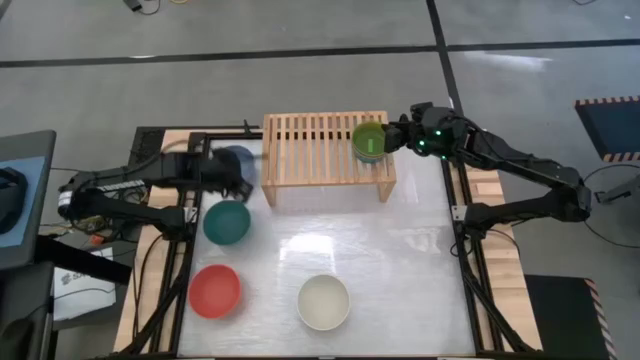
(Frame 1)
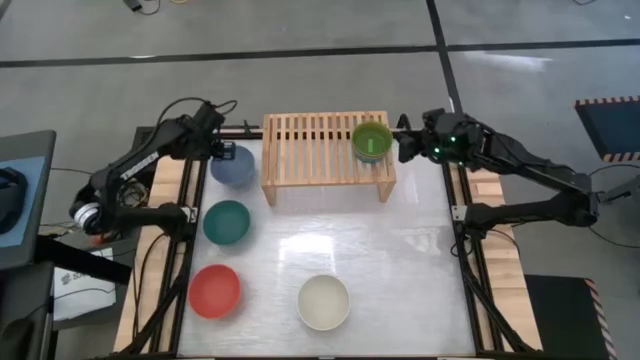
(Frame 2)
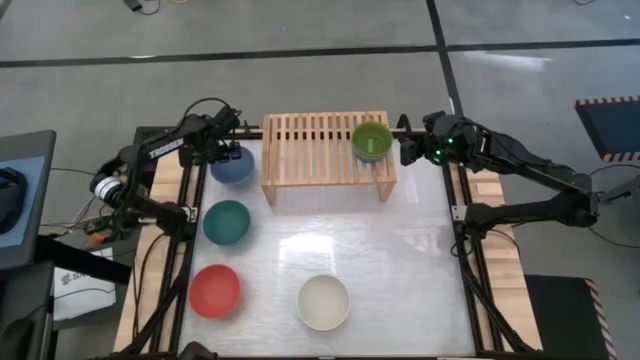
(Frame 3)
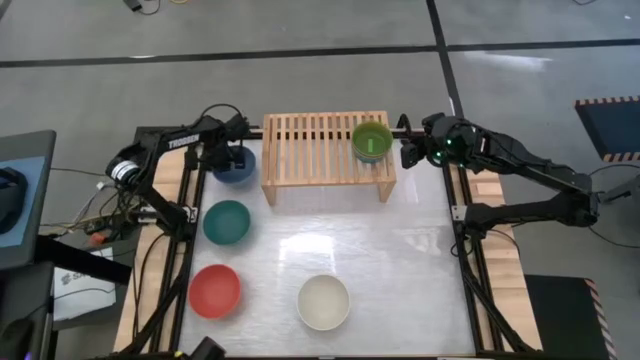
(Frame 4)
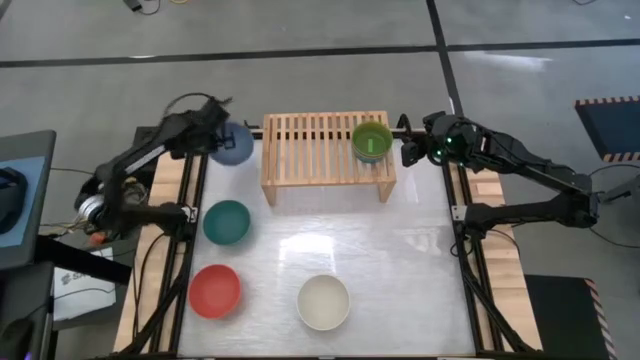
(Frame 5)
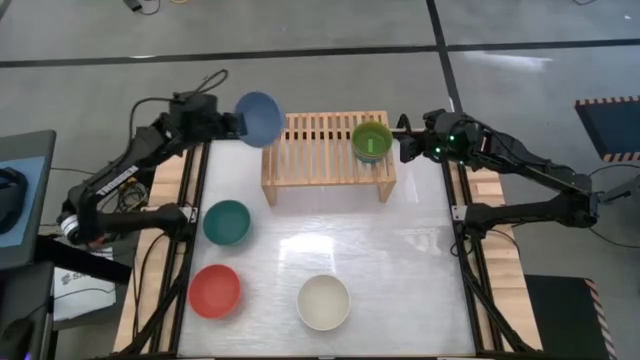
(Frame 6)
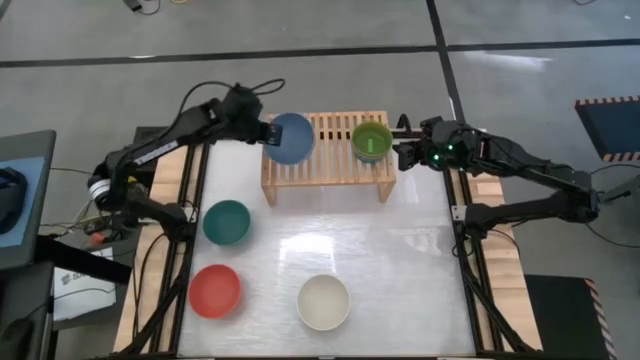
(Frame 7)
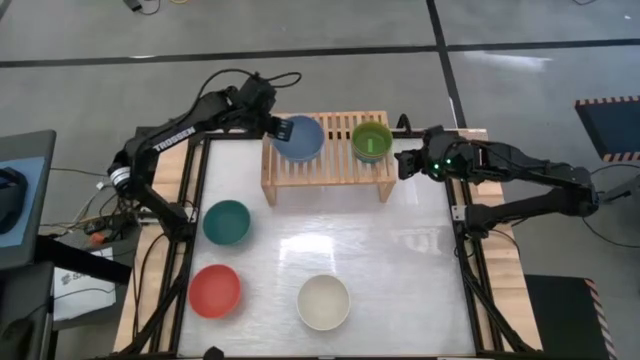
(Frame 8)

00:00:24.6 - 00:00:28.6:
Task: Place and stack bowls onto a shelf
Put the large blue bowl on the shelf

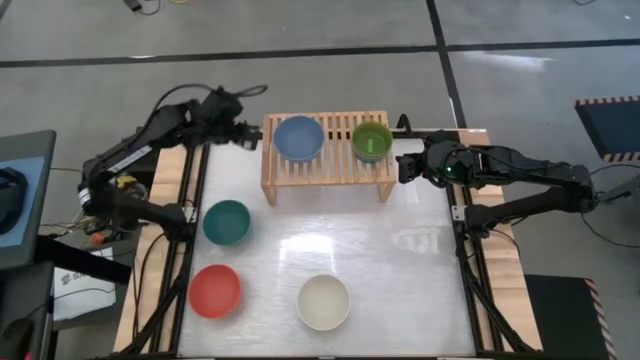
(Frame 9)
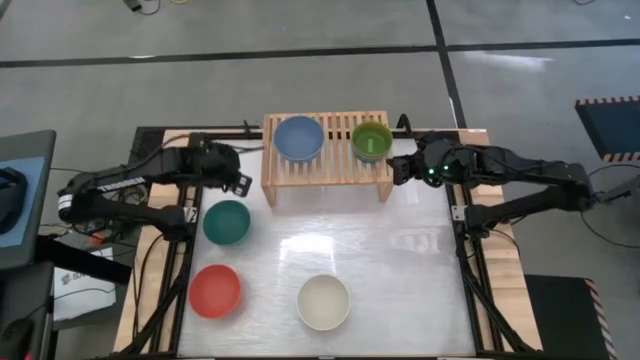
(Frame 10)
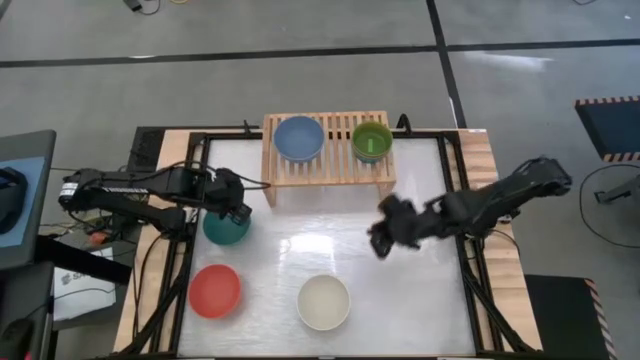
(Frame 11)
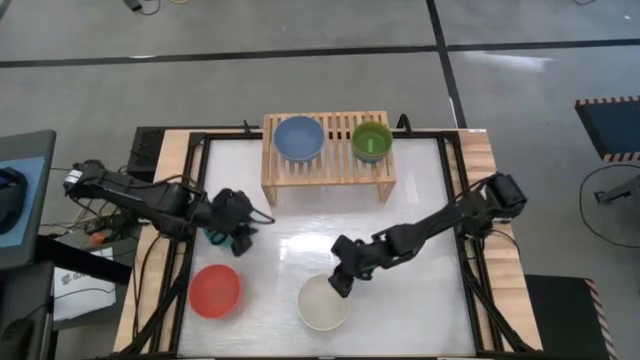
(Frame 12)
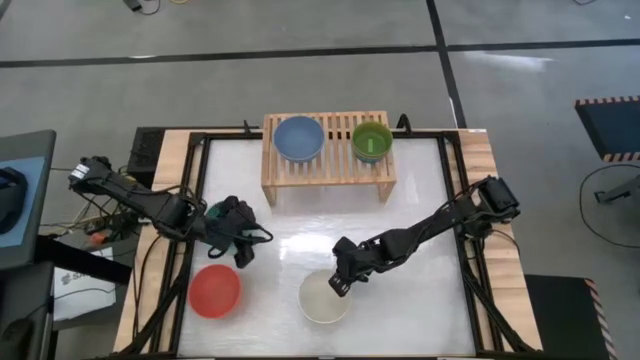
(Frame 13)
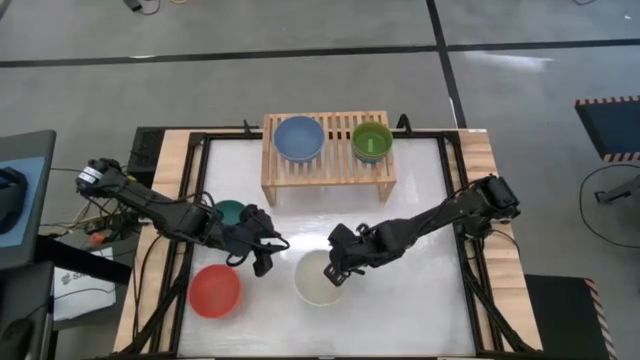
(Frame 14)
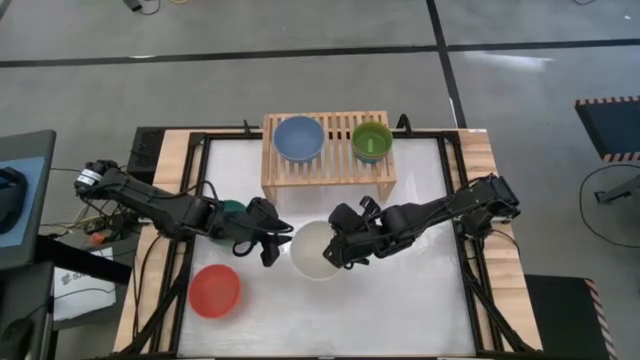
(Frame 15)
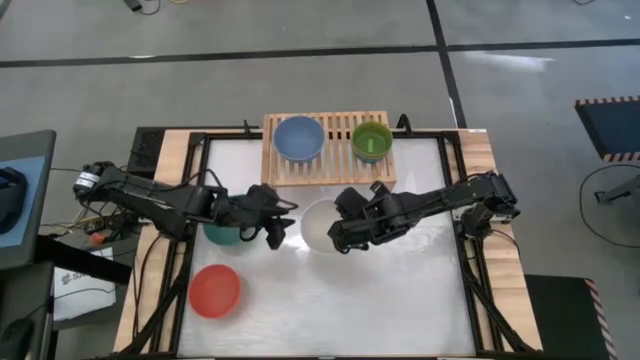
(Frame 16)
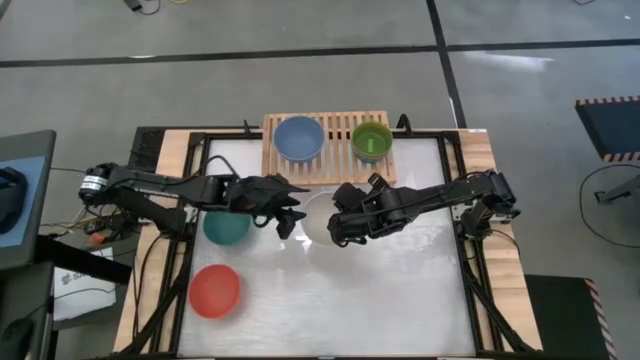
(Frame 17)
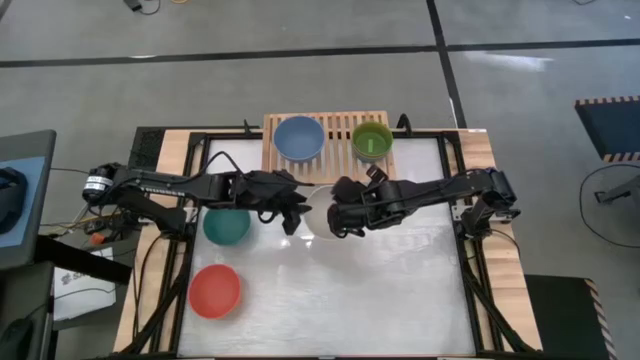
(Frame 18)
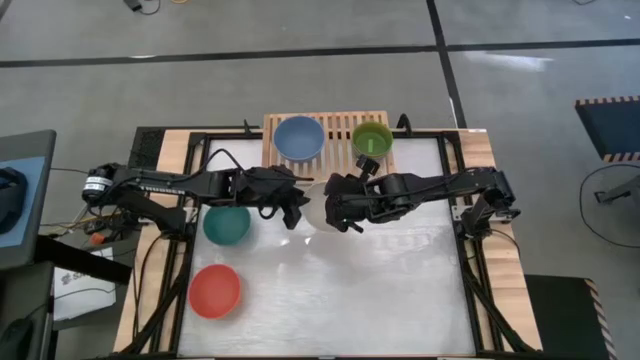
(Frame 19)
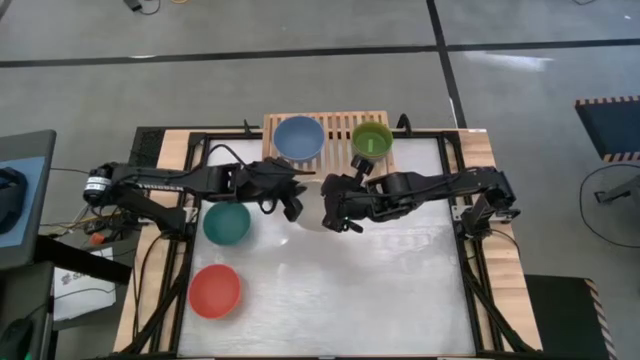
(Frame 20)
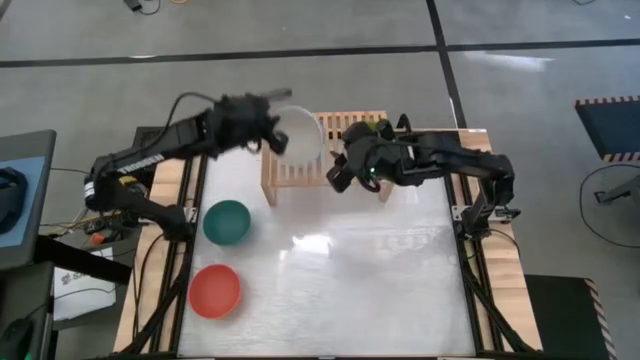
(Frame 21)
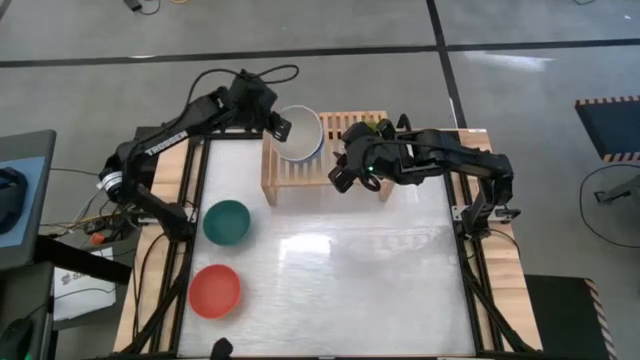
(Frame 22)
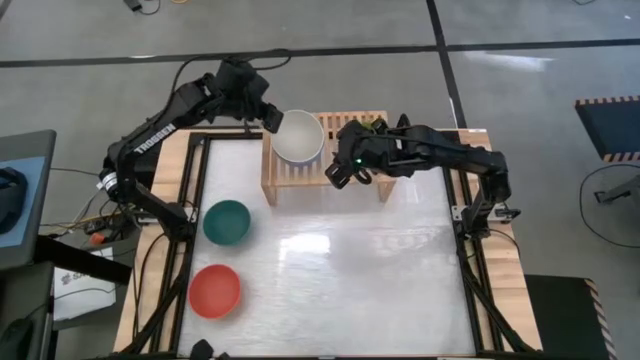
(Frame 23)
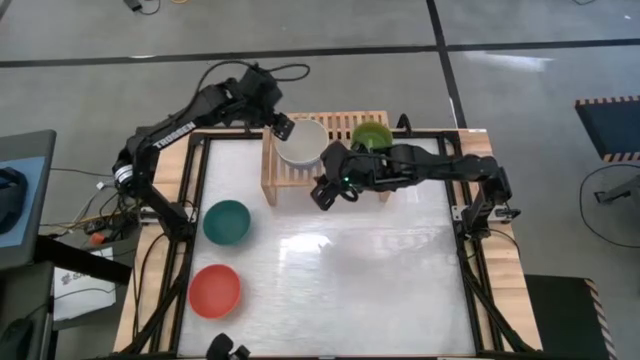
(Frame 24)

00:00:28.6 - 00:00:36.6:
Stack the large white bowl on top of the large blue bowl on the shelf

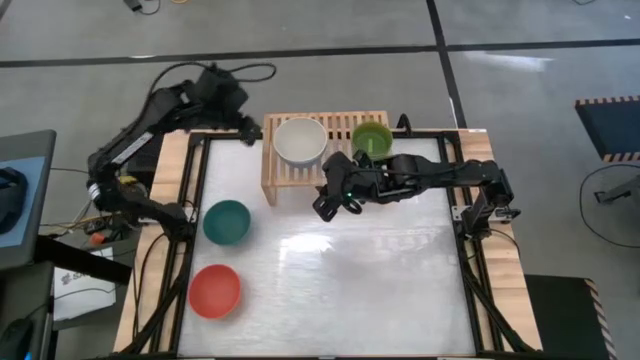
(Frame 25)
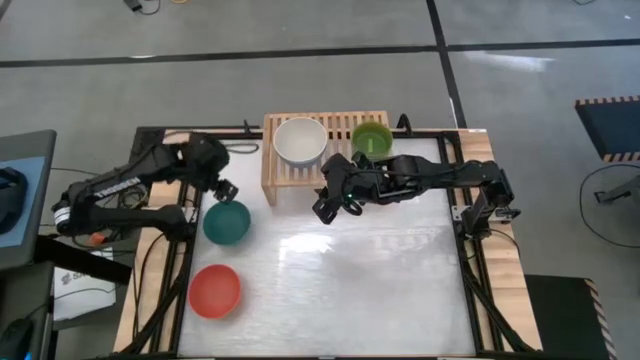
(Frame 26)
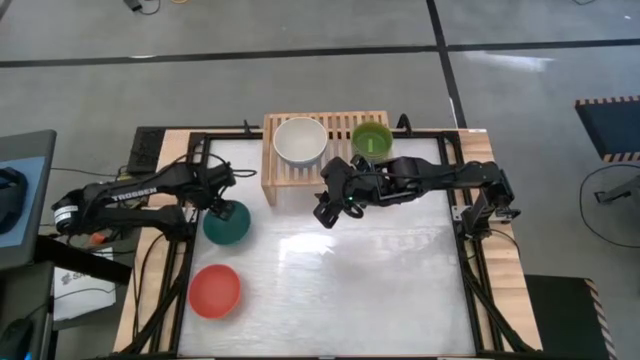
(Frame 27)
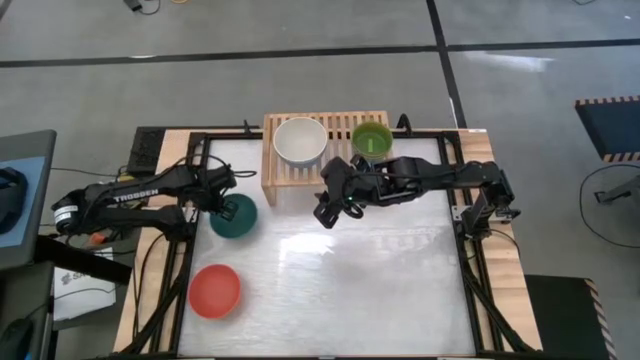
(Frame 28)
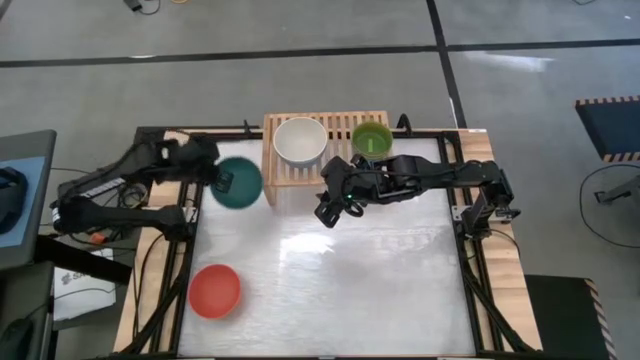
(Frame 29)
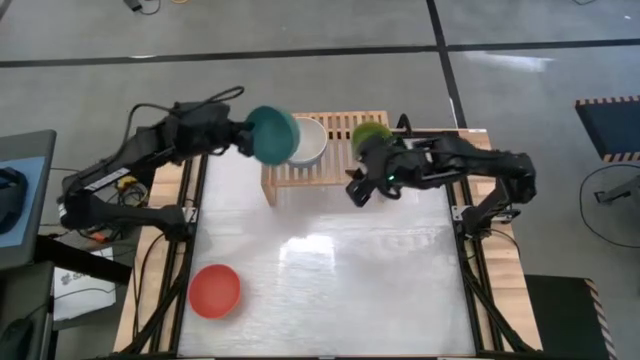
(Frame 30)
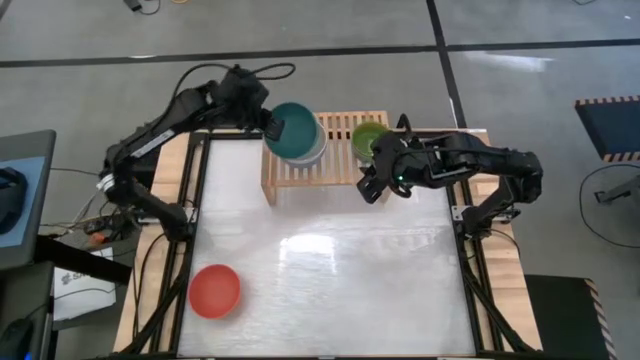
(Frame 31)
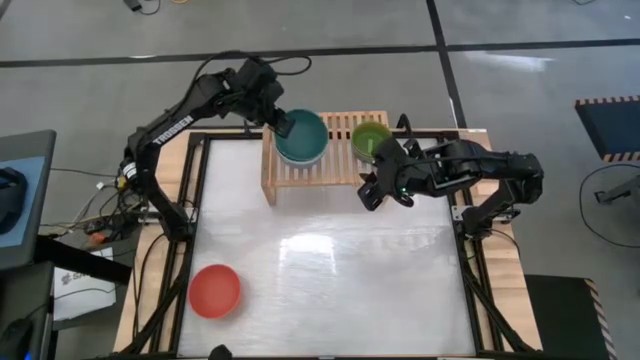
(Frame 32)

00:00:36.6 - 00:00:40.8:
Stack the large green bowl on top of the large white bowl on the shelf

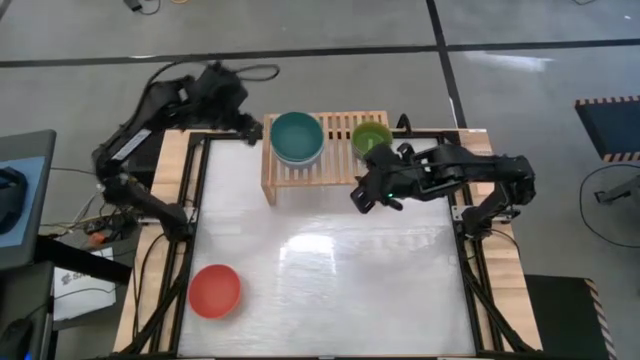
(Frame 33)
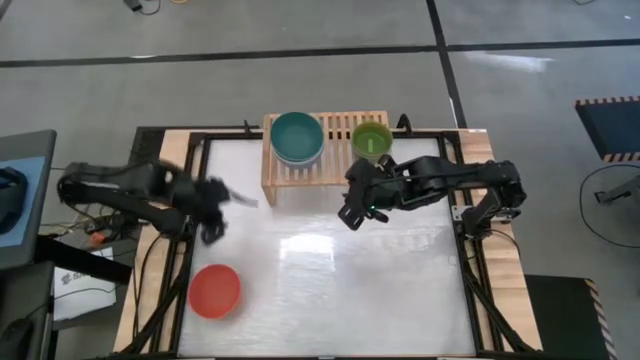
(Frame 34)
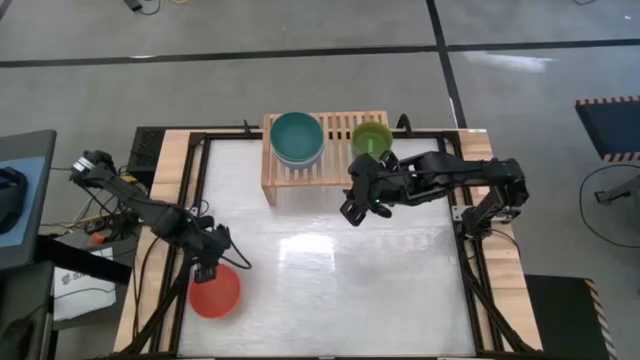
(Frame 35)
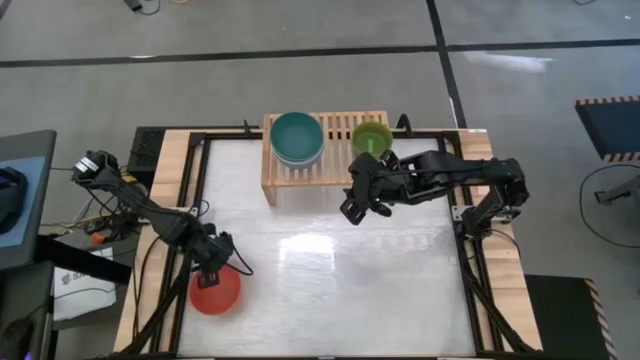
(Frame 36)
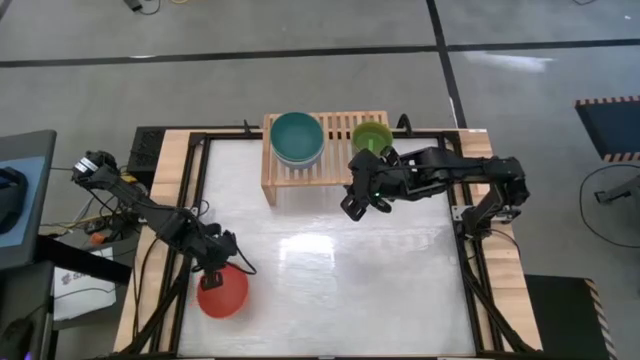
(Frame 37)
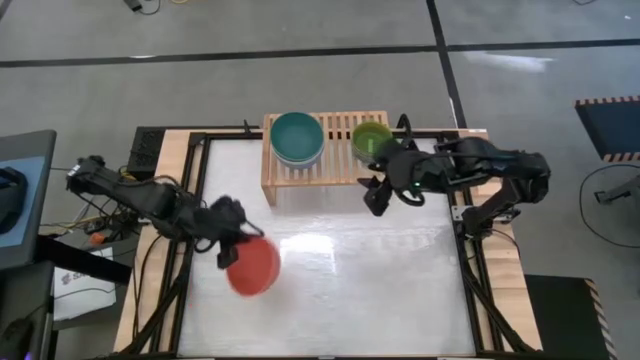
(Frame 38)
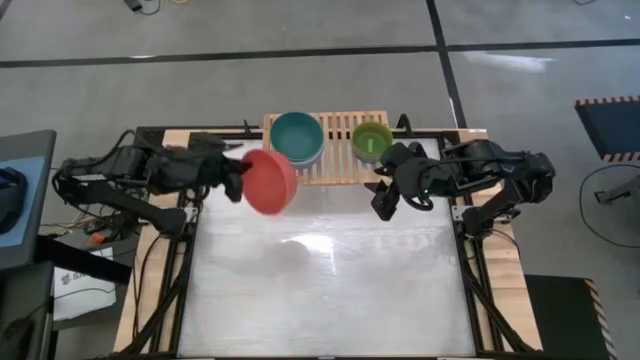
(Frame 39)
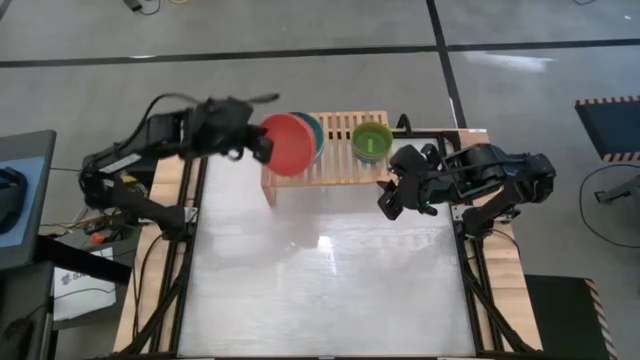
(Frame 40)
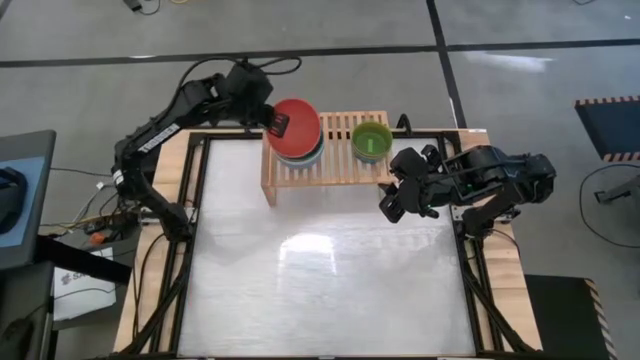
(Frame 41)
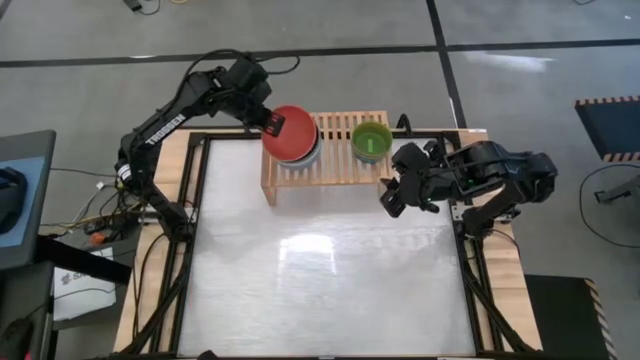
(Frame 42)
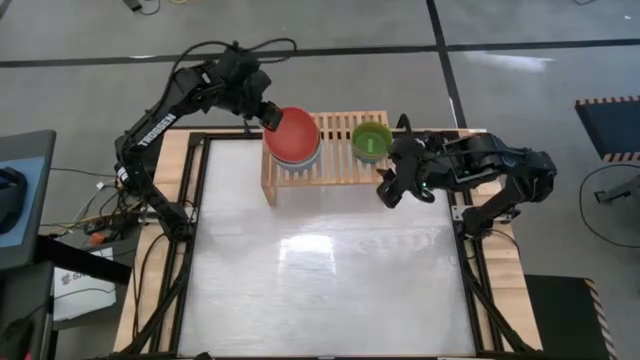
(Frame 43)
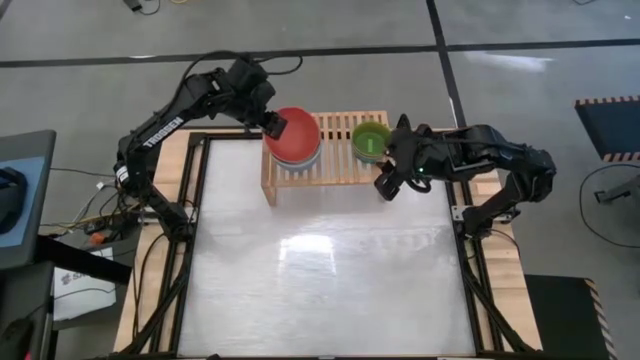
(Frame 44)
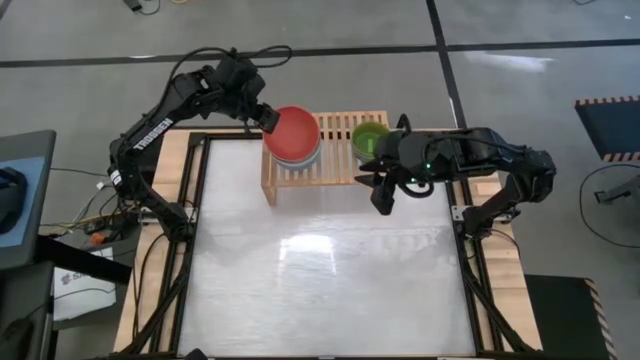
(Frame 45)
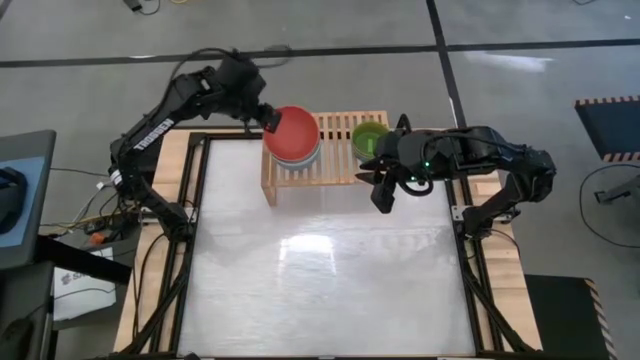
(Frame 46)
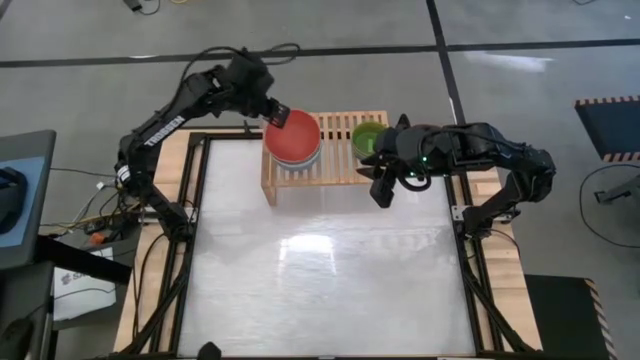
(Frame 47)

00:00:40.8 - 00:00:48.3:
Stack the large orange bowl on top of the large green bowl on the shelf
